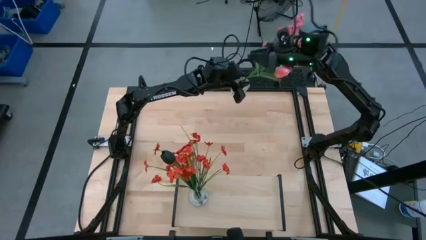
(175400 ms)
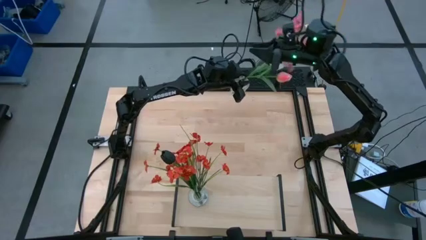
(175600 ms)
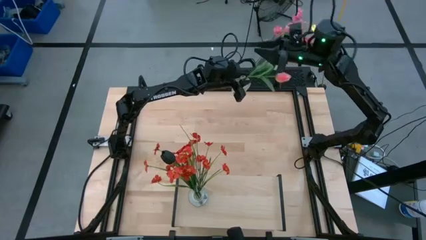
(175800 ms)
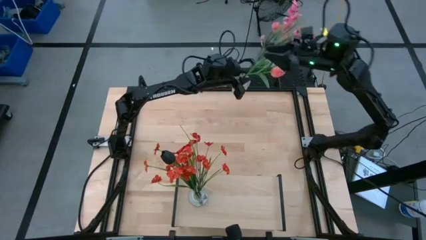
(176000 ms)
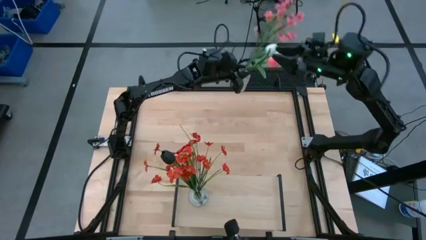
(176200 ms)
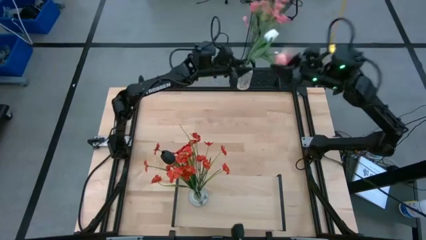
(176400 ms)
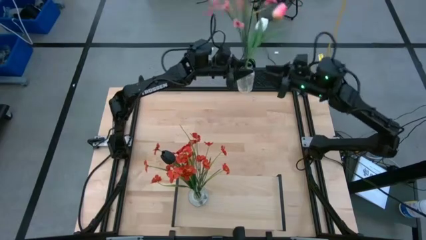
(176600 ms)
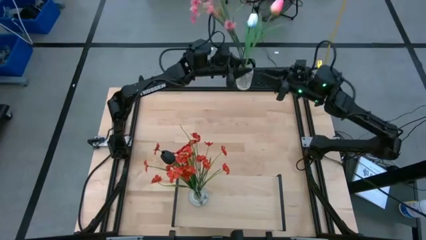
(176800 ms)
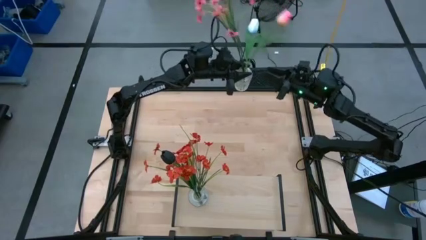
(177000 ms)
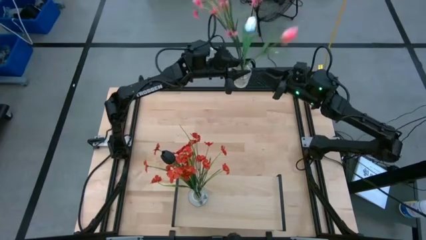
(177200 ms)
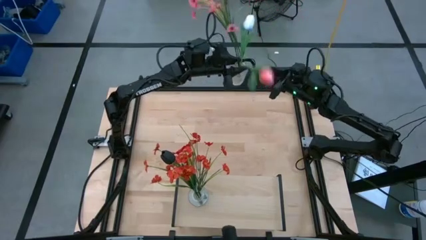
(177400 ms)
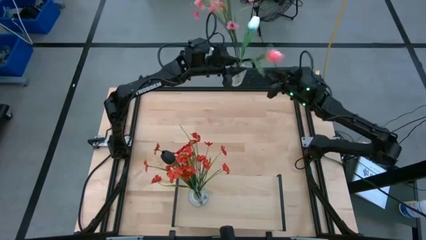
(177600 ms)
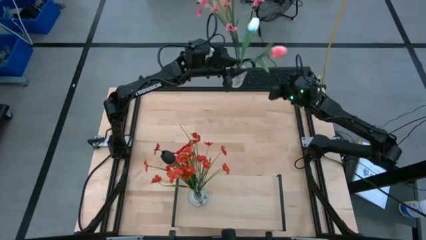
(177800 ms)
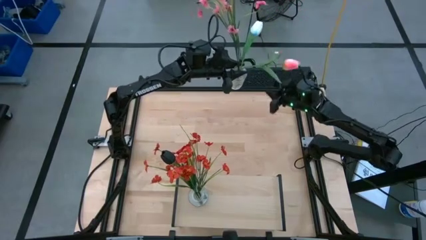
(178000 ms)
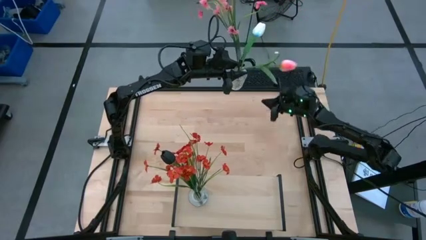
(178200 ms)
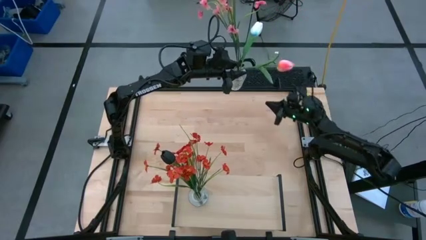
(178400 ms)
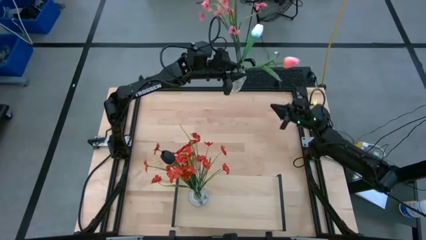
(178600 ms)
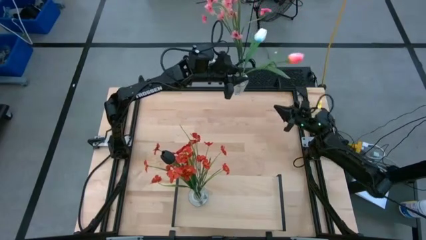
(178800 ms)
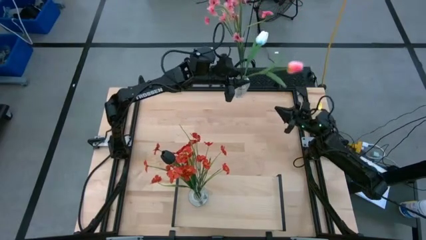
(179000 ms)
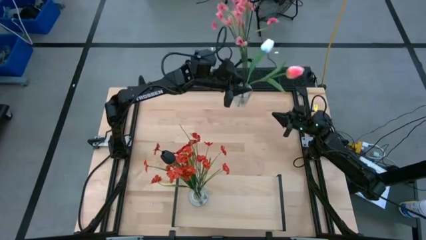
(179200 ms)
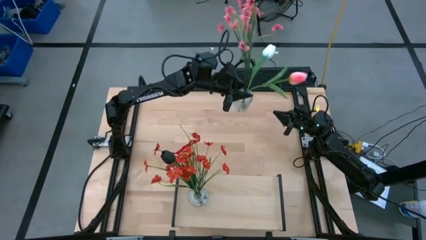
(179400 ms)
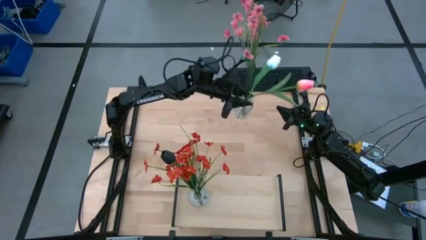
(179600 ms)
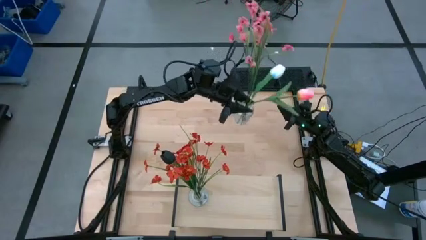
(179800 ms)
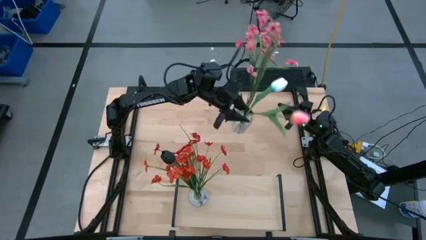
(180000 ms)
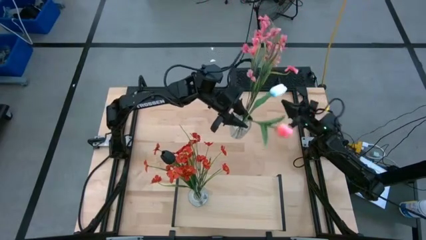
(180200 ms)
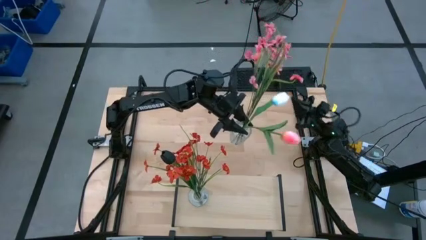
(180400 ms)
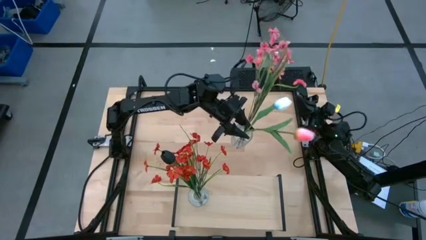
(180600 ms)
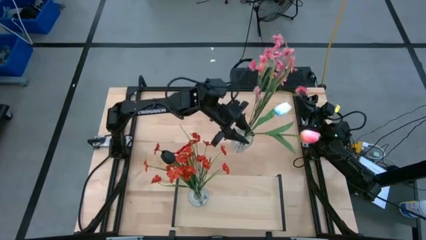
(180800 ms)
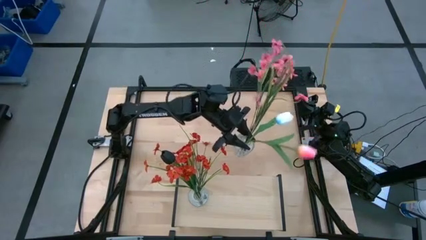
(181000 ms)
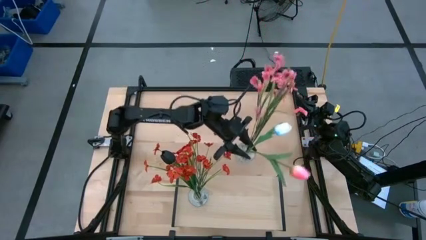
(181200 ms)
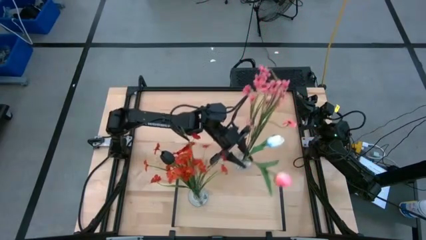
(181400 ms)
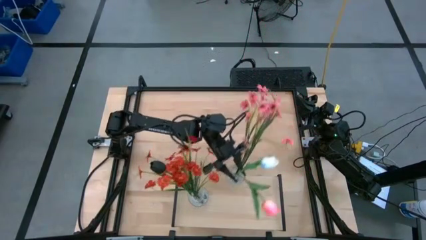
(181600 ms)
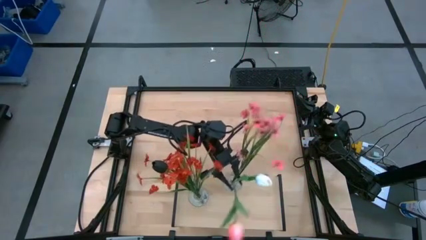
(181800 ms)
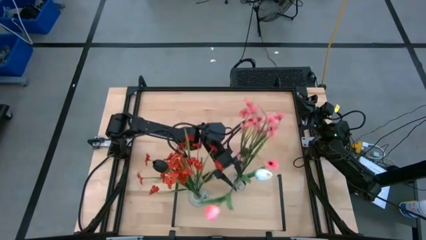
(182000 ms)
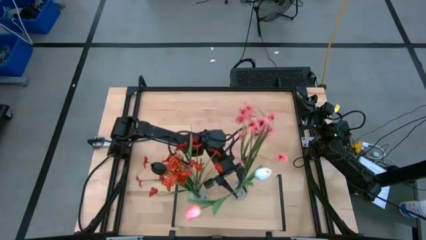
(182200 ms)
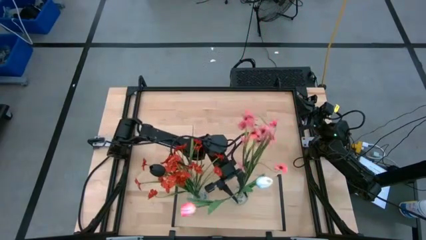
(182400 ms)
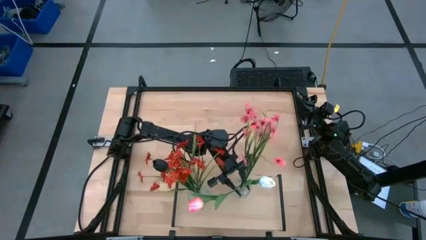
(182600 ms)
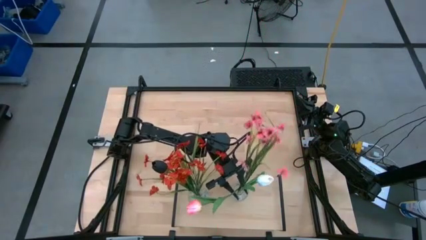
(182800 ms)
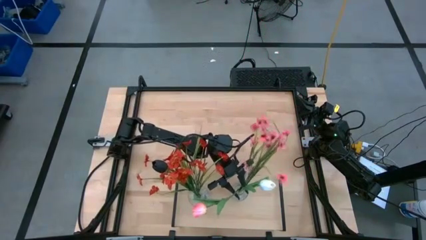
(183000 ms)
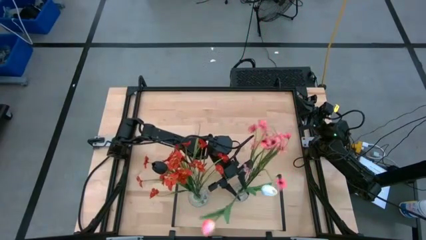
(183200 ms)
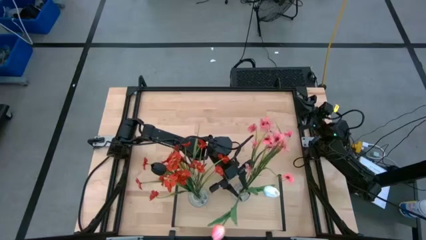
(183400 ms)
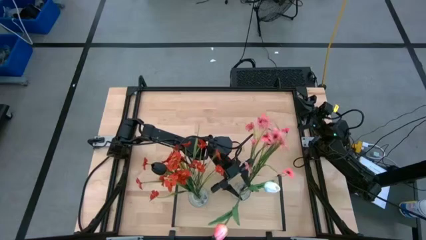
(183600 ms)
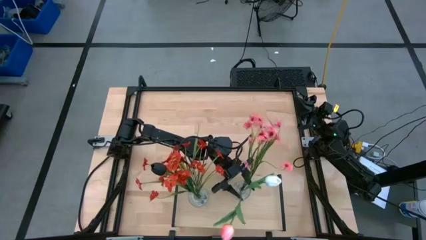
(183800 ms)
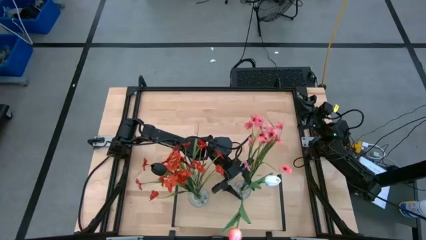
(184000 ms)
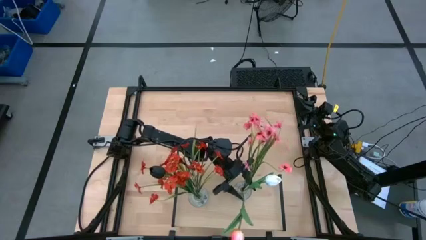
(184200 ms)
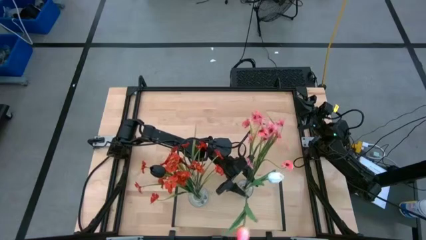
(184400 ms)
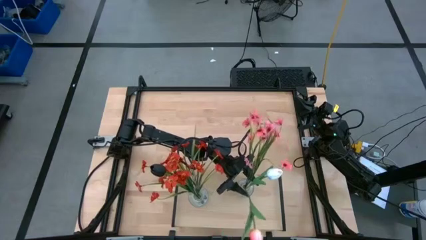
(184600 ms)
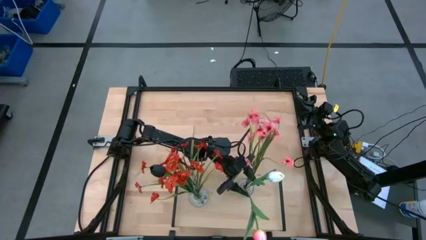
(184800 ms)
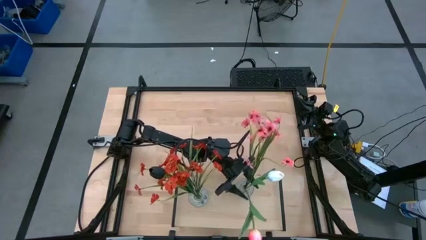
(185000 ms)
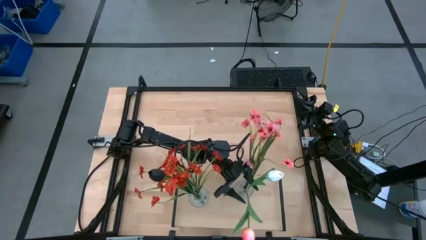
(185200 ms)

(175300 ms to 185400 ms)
Task: Pick and place flowers into a vace then onto a shelf
Put the transparent vase with flowers on the shelf

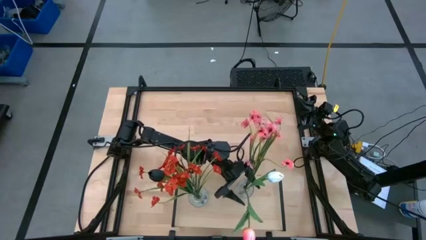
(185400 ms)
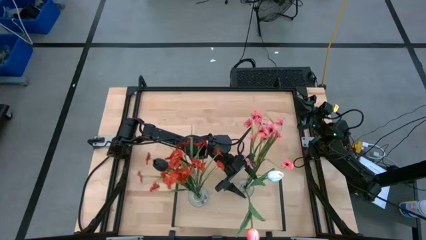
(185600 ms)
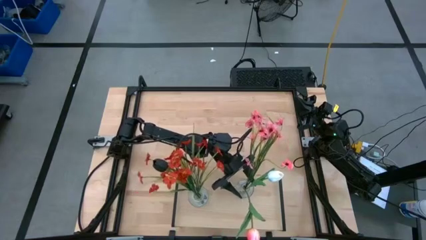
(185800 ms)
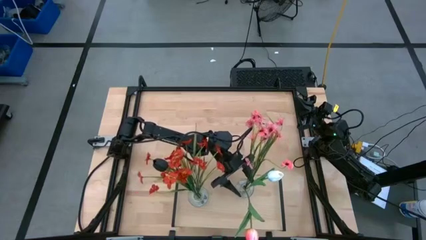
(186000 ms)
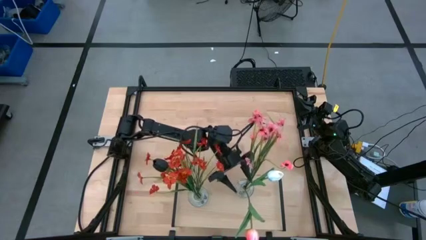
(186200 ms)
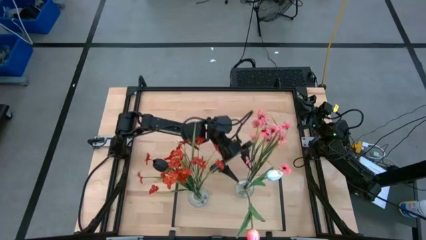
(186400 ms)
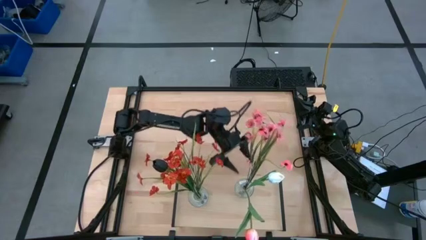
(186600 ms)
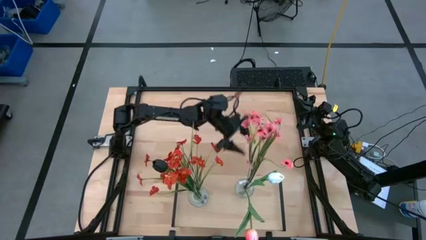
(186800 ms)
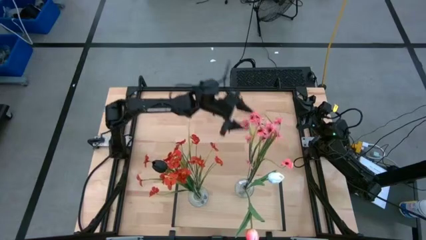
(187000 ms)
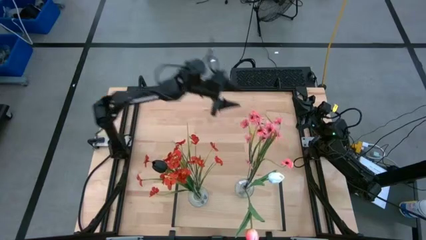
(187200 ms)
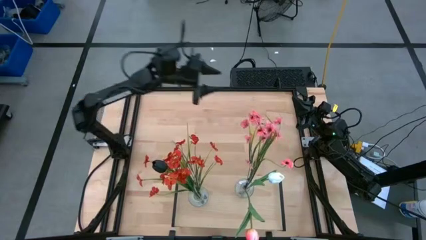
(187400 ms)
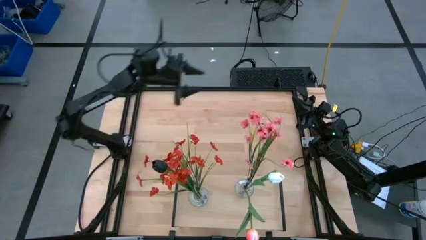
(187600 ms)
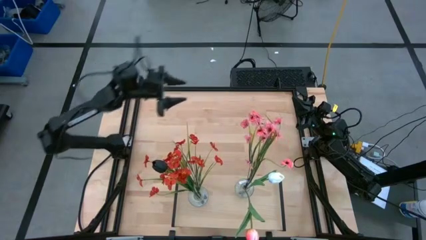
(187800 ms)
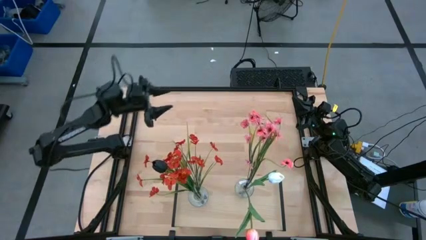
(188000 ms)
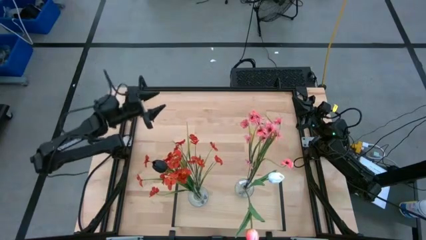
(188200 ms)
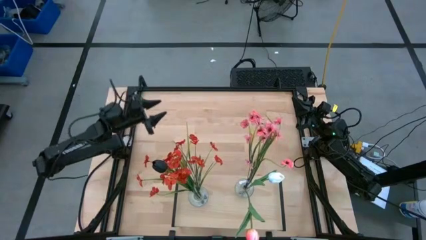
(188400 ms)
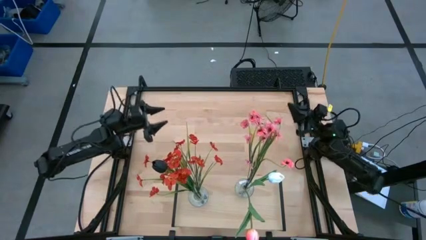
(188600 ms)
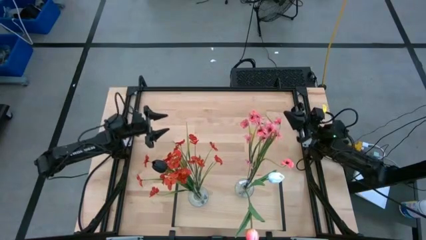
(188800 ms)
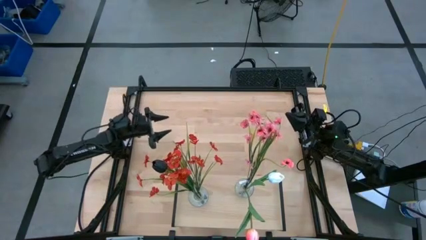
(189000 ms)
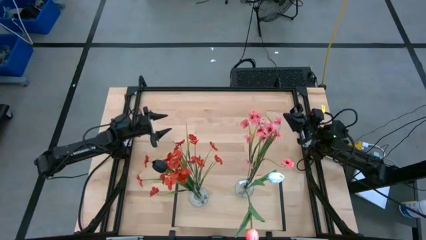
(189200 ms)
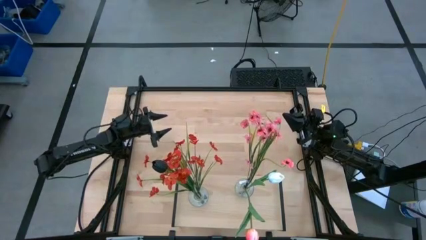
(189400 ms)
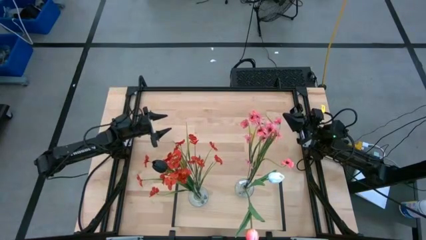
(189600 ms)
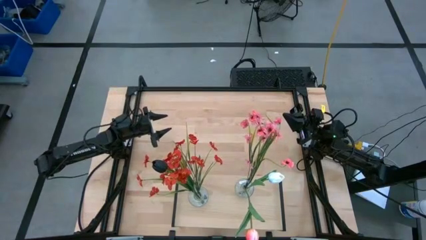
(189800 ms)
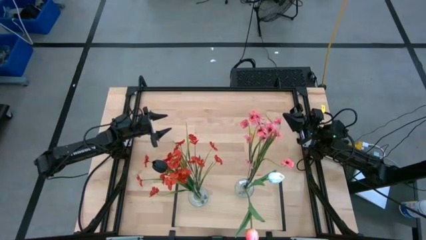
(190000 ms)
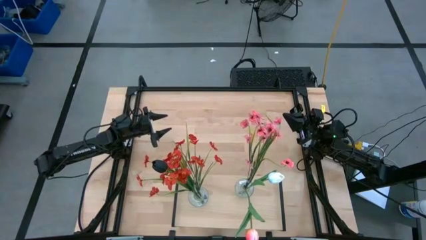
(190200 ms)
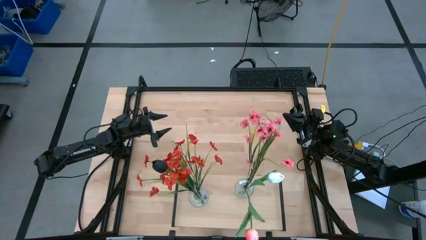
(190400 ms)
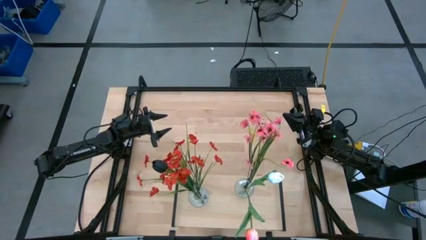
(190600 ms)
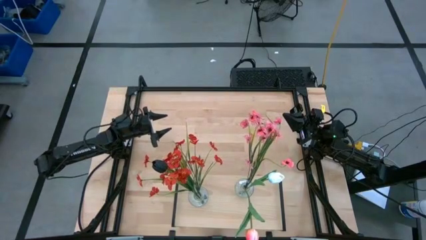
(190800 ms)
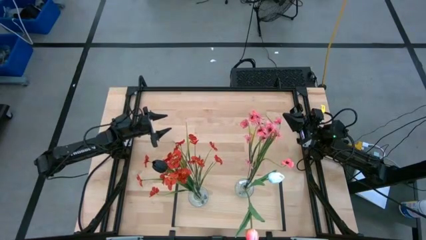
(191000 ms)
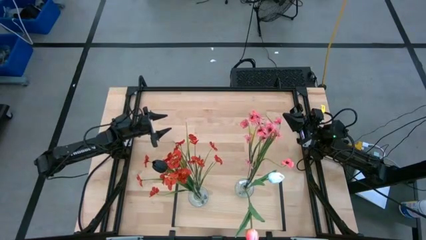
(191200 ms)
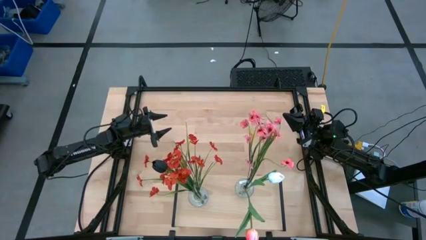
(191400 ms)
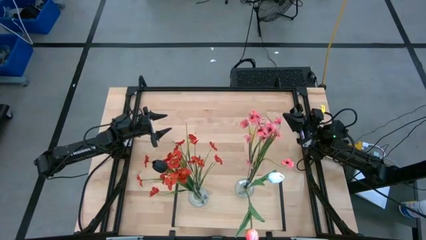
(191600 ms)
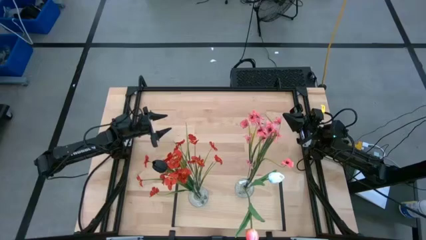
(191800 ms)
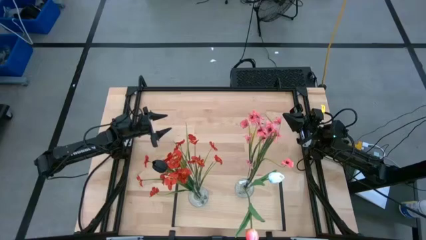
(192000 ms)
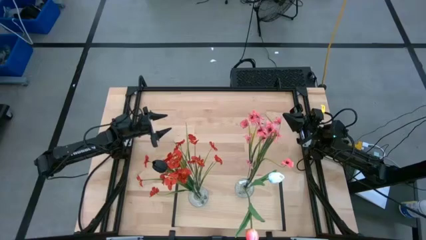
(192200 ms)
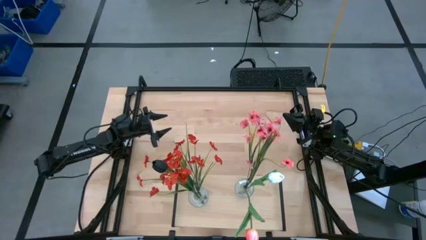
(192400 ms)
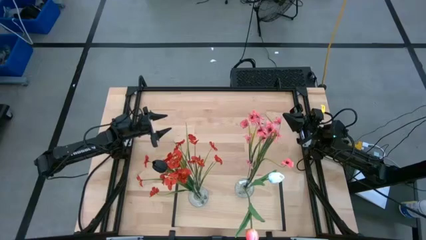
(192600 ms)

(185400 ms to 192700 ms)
Return to Home Position
